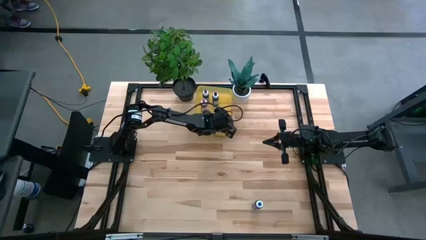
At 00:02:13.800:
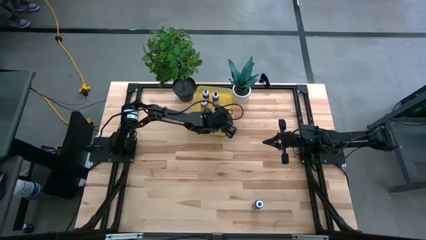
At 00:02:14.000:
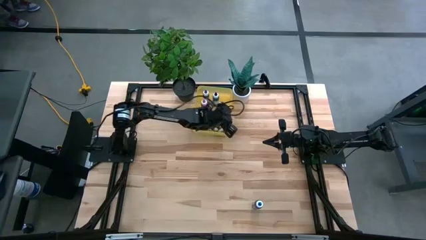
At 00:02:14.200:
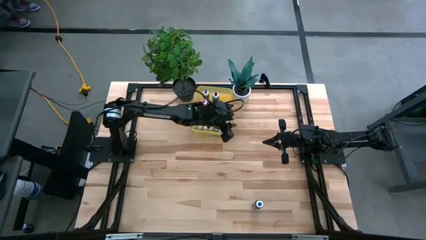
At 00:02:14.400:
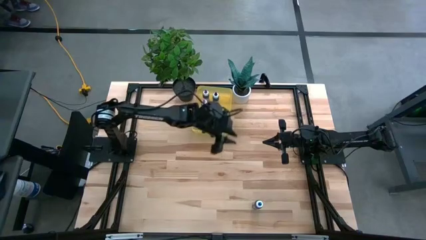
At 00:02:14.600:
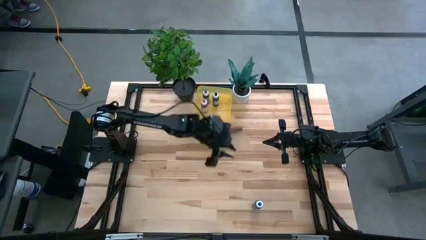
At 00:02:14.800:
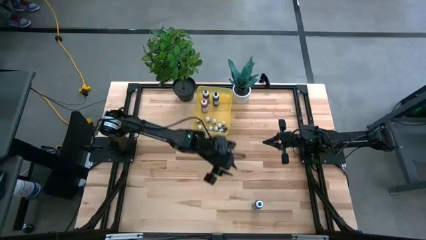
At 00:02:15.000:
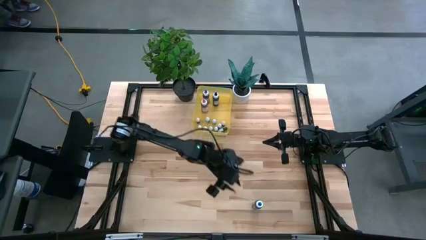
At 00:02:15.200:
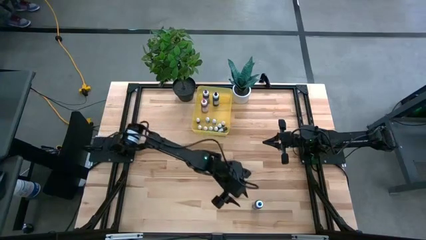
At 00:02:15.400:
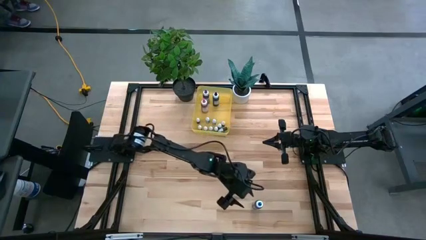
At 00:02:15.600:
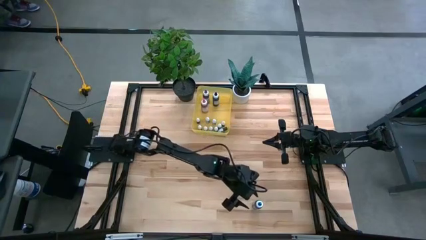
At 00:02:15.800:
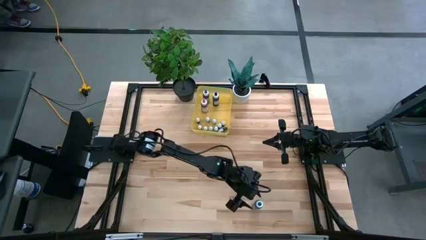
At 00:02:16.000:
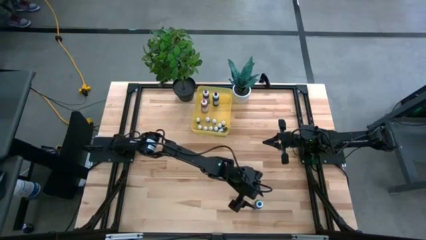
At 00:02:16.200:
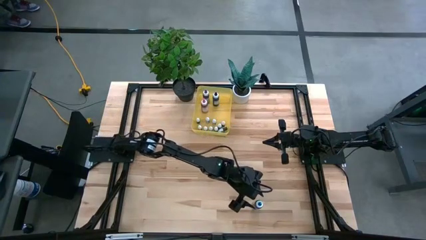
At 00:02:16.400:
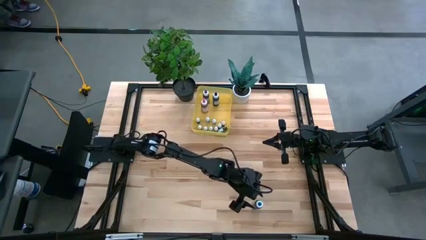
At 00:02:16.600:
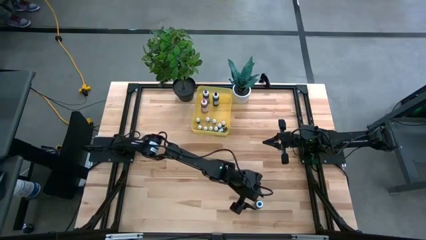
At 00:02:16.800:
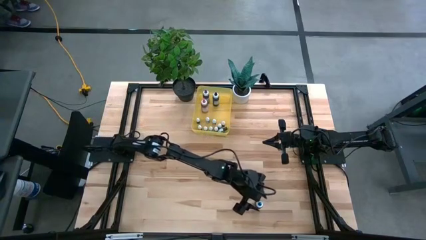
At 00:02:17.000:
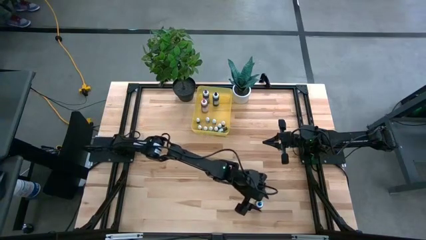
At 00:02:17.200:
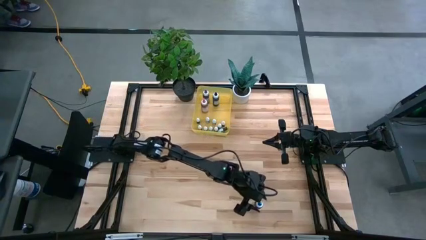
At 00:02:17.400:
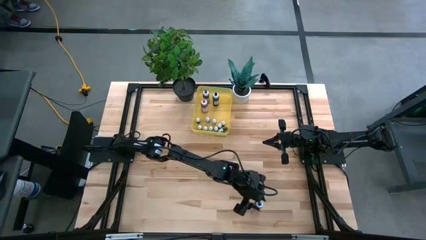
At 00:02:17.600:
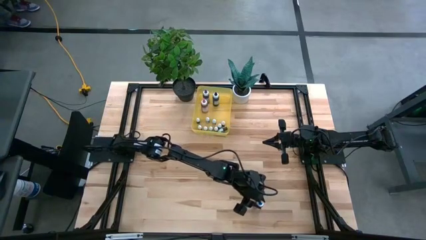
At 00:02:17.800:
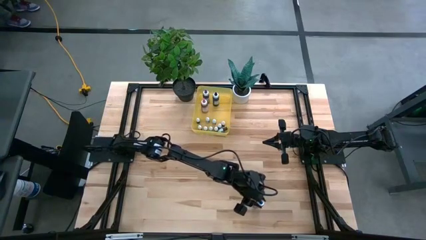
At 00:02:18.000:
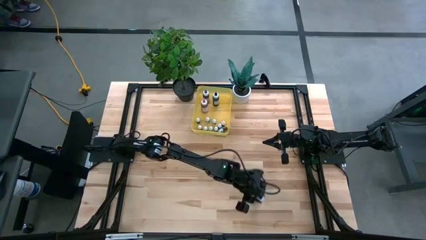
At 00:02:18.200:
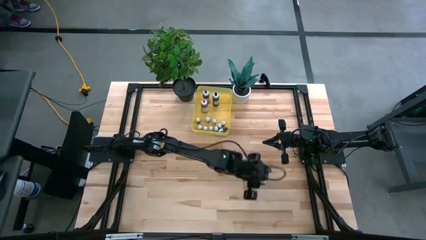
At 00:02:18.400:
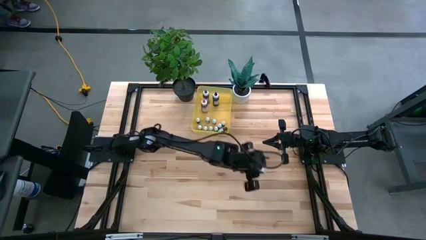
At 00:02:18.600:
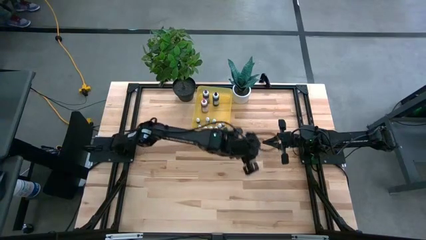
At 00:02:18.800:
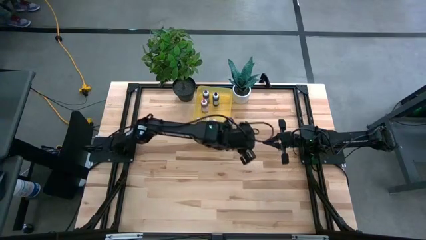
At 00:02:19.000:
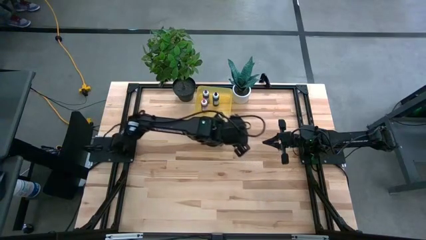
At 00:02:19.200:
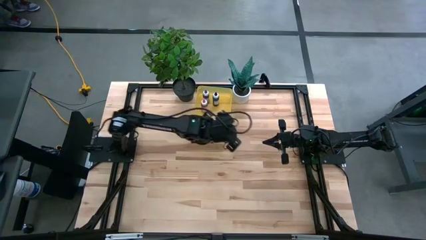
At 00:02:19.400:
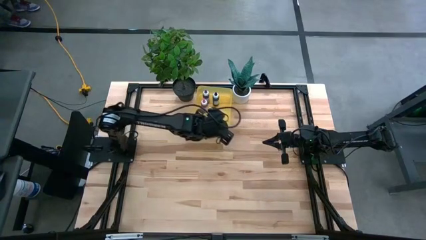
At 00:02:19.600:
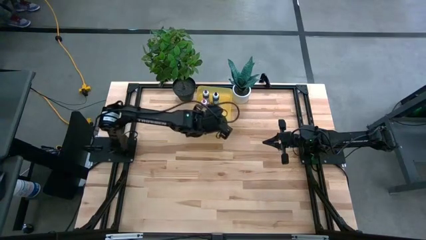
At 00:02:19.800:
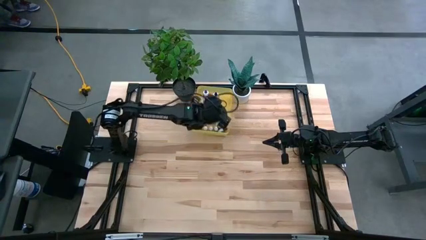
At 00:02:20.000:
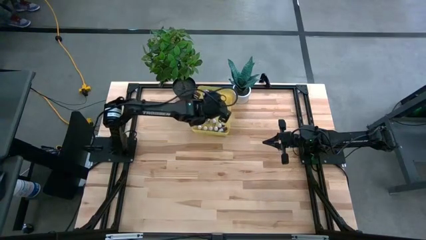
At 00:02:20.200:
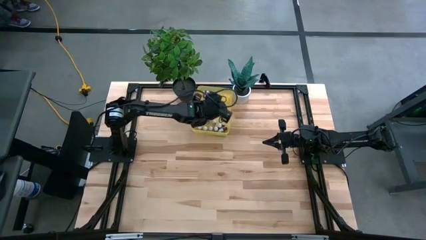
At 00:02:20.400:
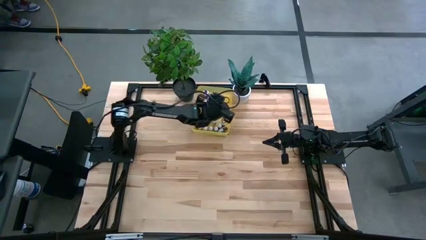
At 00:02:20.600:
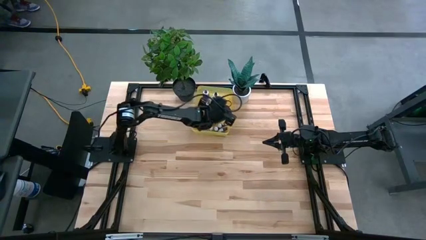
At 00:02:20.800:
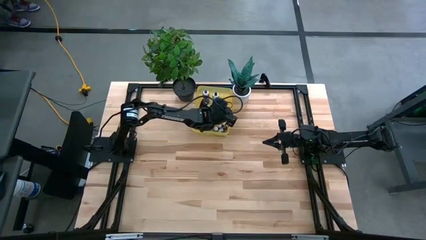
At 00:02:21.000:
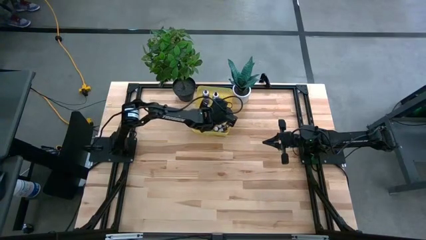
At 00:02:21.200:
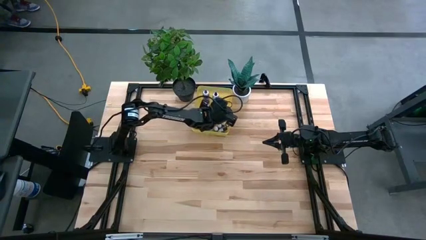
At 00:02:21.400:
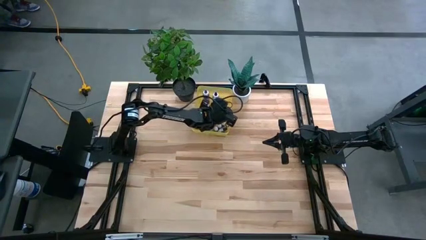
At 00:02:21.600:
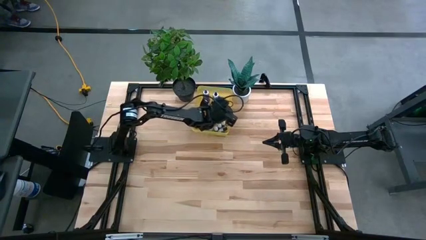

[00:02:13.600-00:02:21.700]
Task: Pick & Place food coloring
Put the large blue food coloring bottle into the yellow bin

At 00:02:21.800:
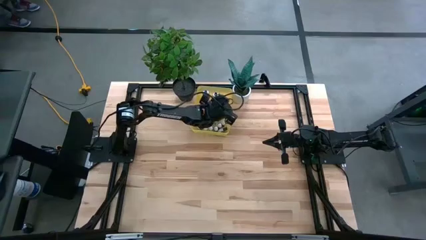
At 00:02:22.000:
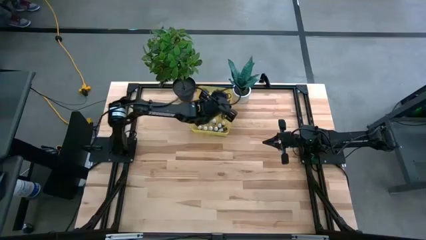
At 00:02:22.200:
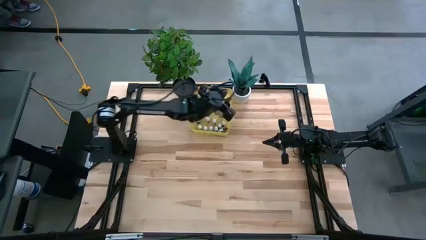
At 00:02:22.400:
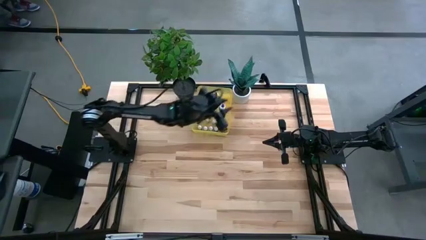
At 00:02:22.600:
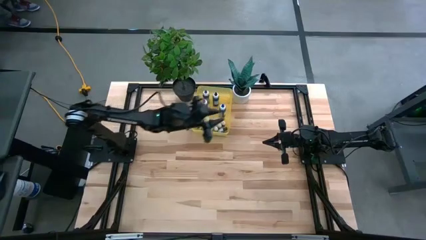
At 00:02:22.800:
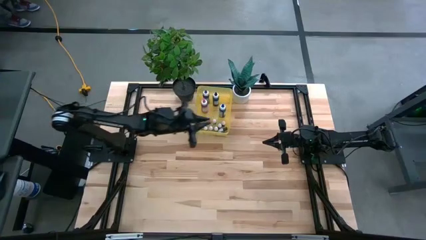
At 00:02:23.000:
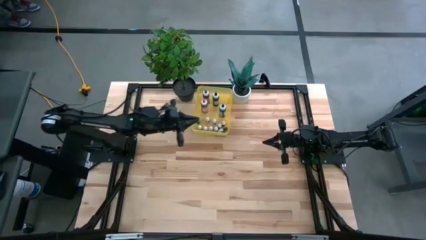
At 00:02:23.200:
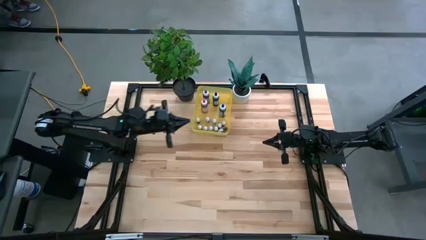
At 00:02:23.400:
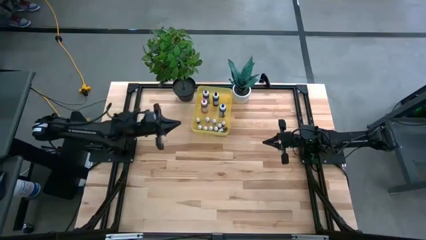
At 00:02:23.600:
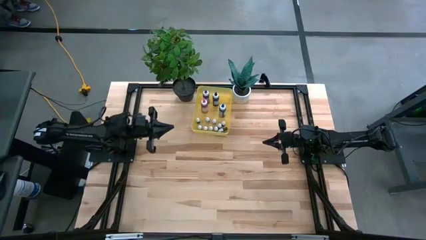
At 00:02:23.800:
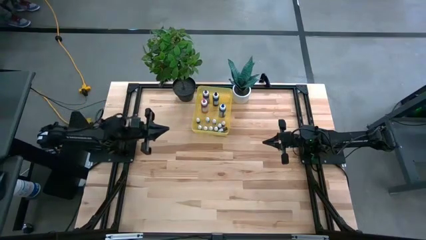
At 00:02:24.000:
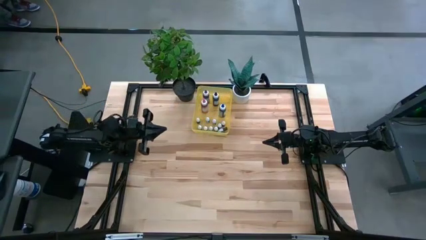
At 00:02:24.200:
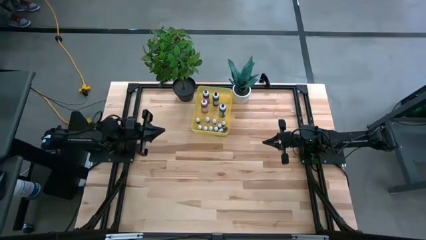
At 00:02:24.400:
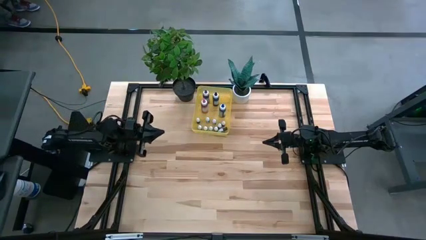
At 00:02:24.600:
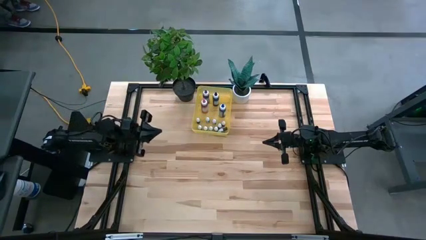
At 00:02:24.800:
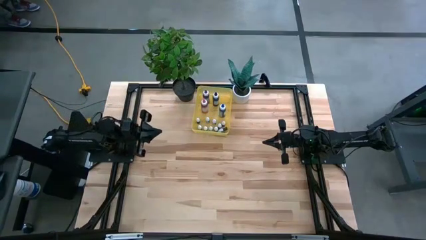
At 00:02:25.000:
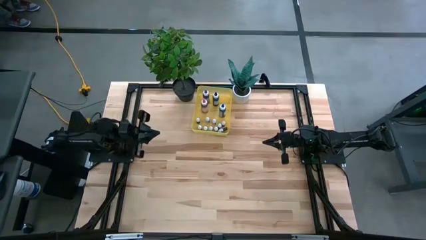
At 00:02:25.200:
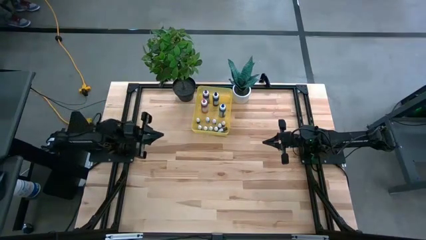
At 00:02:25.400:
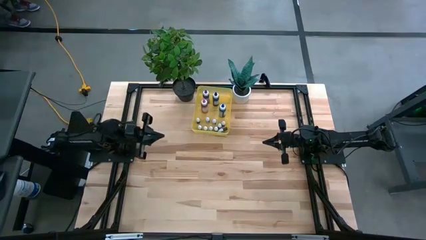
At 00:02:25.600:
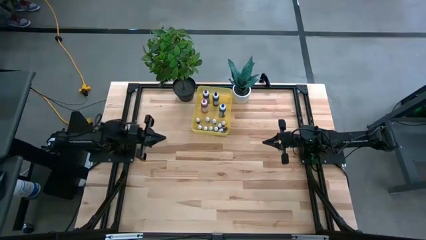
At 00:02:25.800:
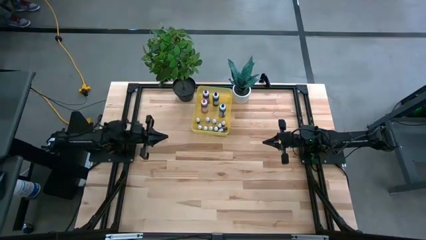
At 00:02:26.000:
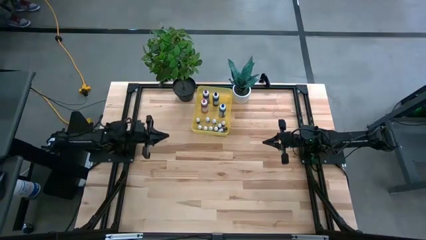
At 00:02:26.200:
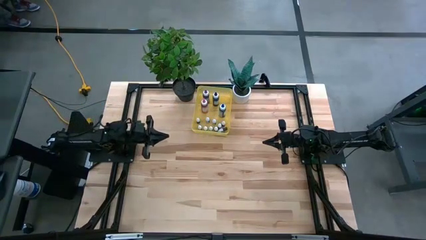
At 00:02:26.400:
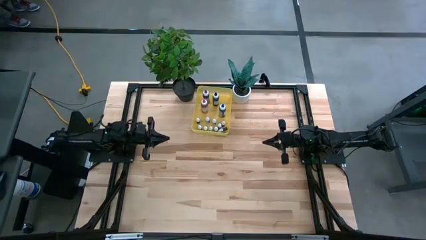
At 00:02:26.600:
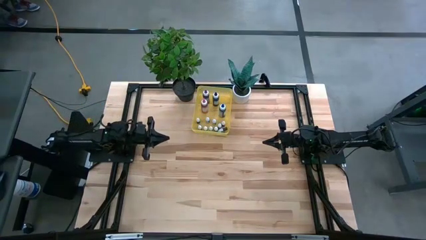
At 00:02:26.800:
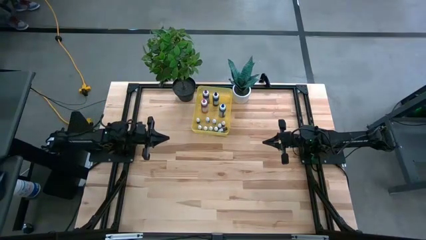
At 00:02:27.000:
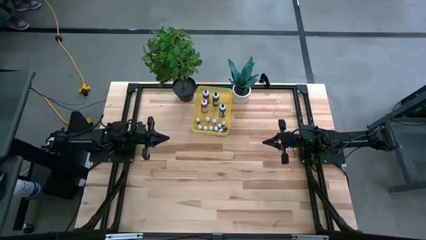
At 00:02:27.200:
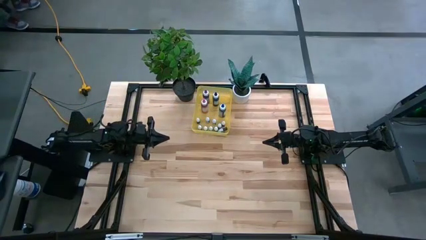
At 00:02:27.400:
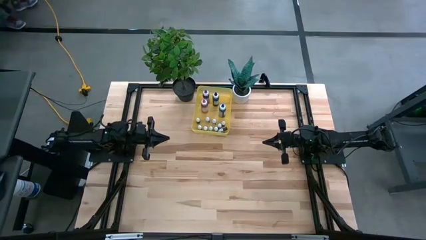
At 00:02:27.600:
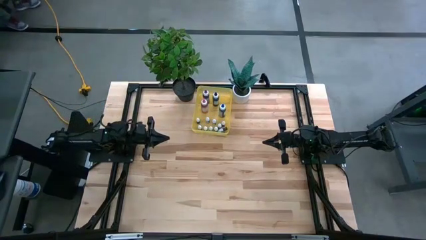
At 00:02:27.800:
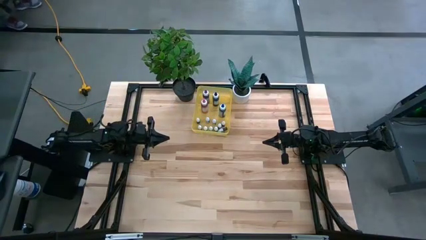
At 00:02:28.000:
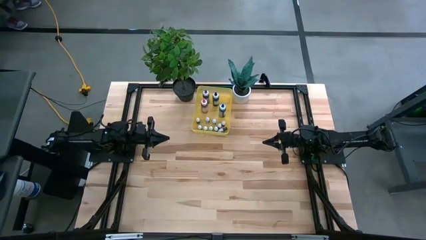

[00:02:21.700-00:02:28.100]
Return to Home Position
